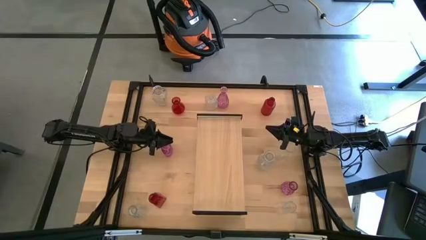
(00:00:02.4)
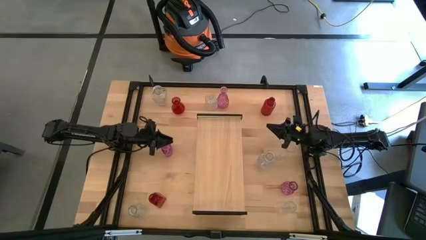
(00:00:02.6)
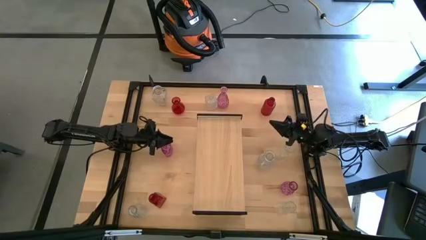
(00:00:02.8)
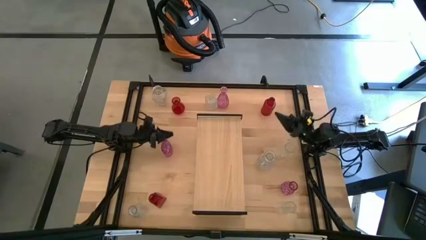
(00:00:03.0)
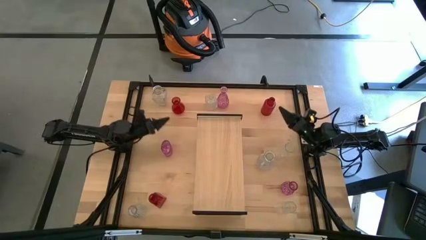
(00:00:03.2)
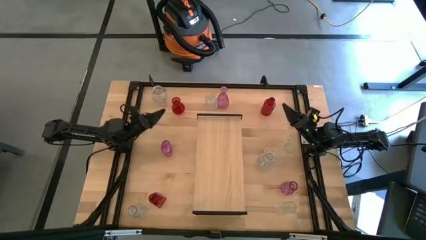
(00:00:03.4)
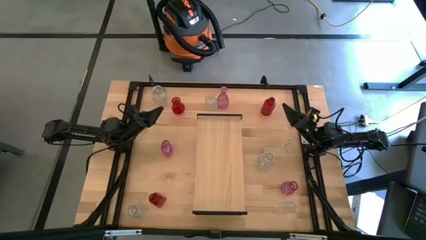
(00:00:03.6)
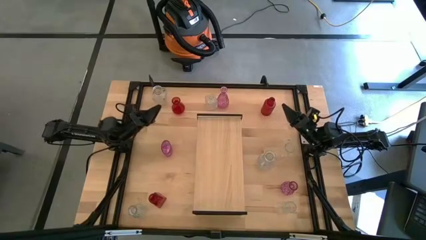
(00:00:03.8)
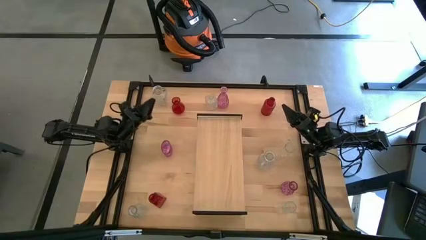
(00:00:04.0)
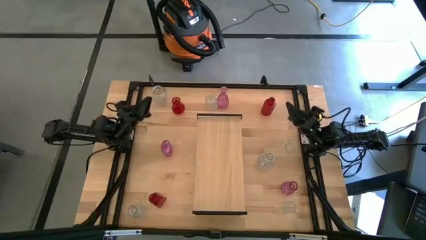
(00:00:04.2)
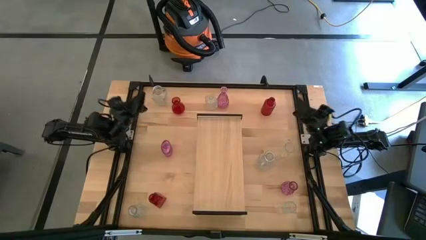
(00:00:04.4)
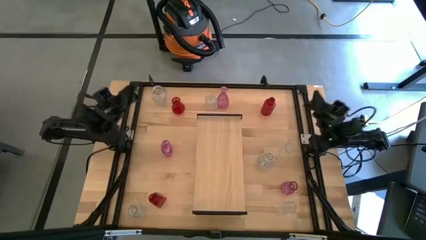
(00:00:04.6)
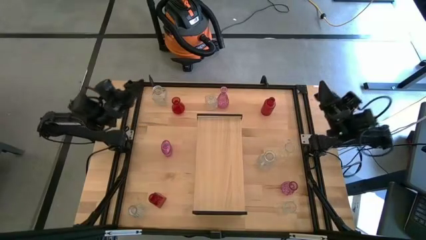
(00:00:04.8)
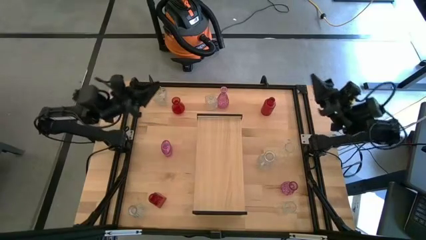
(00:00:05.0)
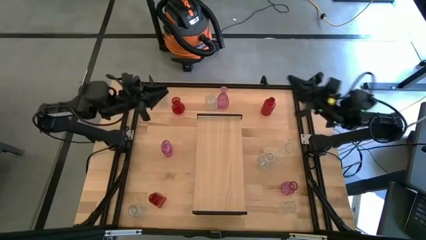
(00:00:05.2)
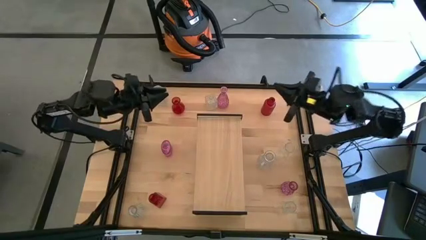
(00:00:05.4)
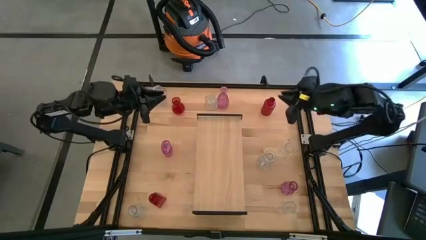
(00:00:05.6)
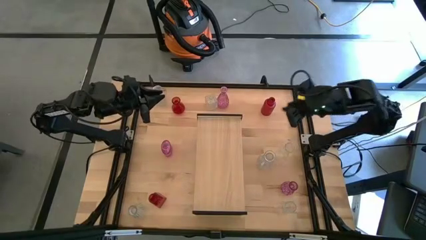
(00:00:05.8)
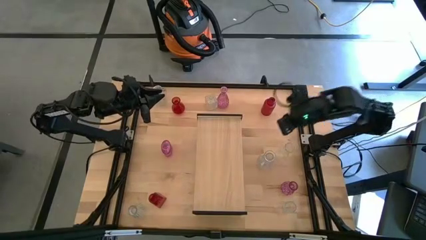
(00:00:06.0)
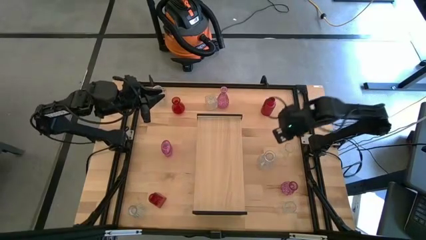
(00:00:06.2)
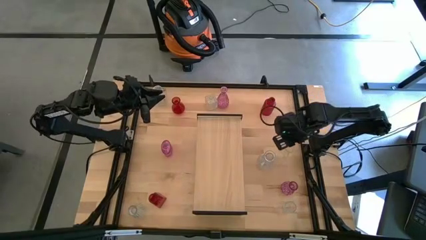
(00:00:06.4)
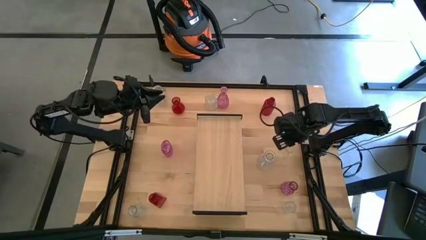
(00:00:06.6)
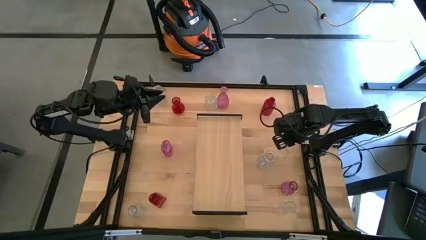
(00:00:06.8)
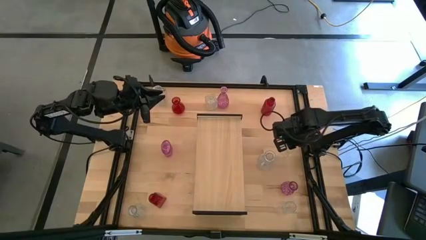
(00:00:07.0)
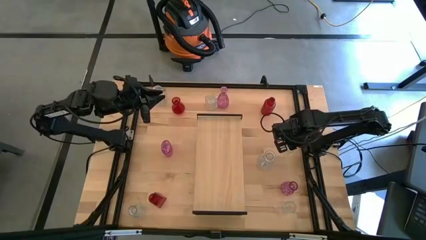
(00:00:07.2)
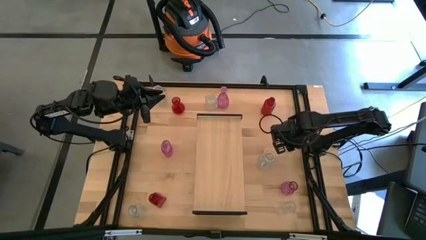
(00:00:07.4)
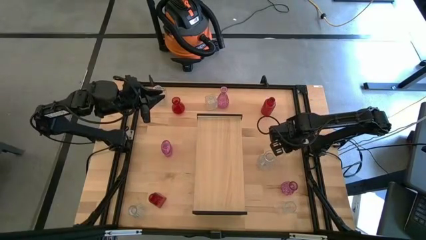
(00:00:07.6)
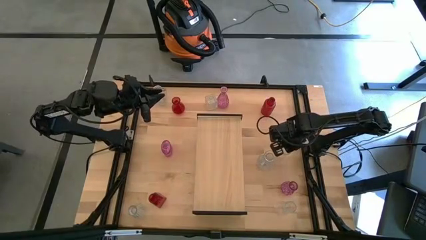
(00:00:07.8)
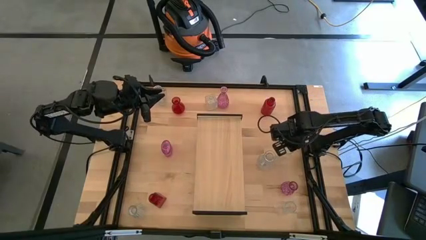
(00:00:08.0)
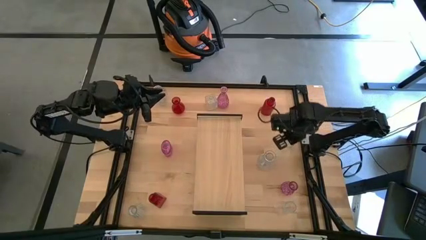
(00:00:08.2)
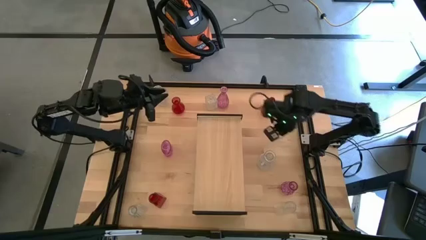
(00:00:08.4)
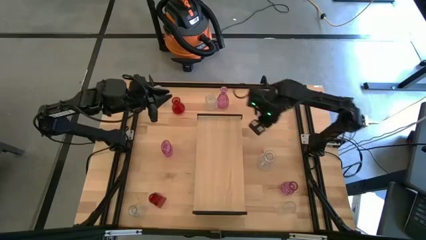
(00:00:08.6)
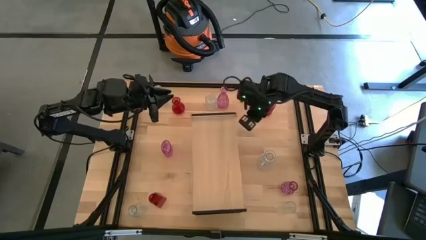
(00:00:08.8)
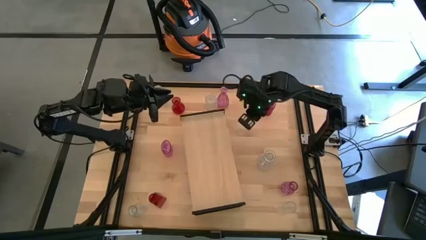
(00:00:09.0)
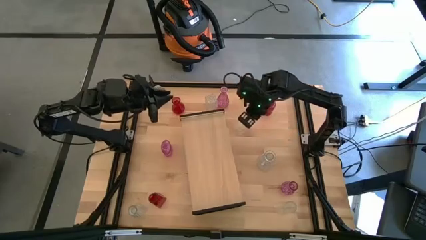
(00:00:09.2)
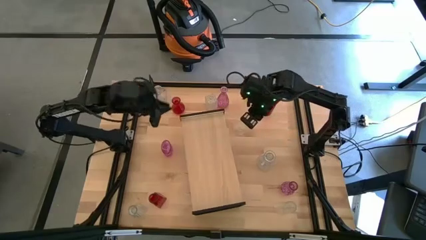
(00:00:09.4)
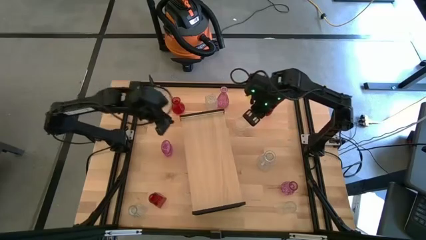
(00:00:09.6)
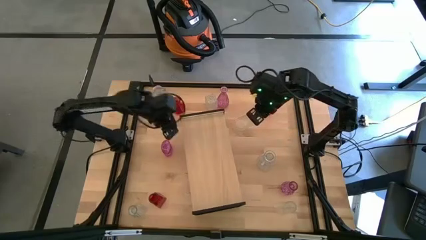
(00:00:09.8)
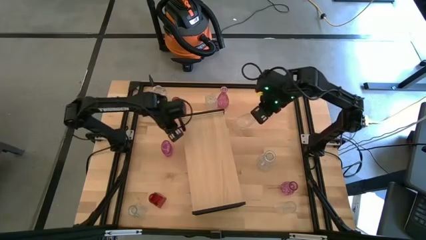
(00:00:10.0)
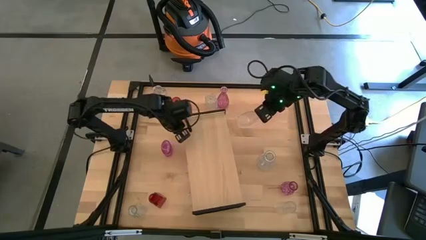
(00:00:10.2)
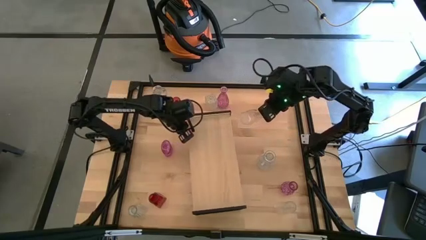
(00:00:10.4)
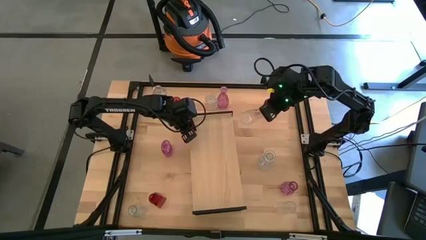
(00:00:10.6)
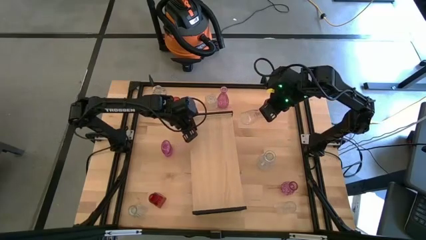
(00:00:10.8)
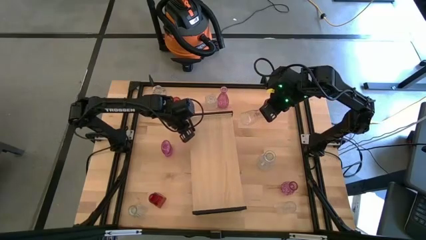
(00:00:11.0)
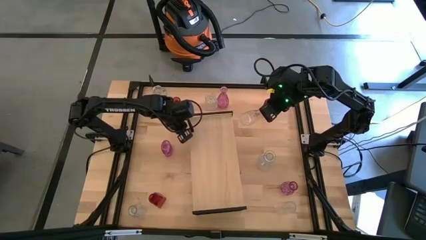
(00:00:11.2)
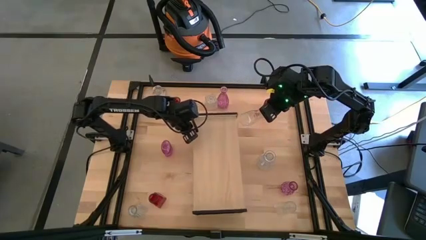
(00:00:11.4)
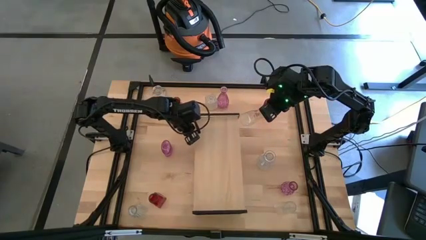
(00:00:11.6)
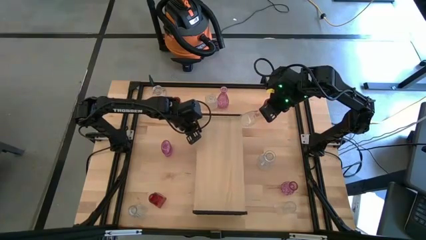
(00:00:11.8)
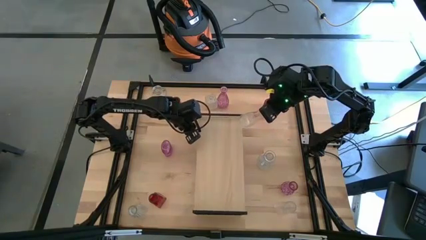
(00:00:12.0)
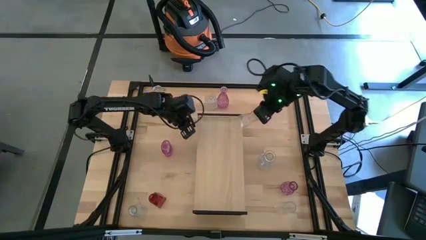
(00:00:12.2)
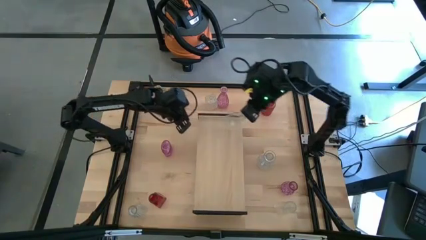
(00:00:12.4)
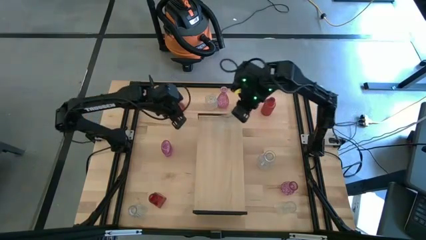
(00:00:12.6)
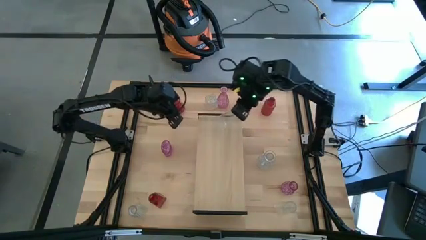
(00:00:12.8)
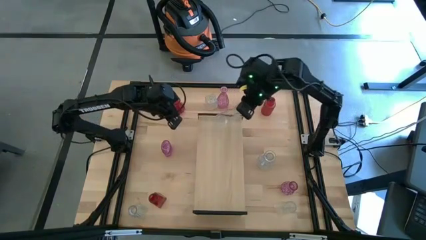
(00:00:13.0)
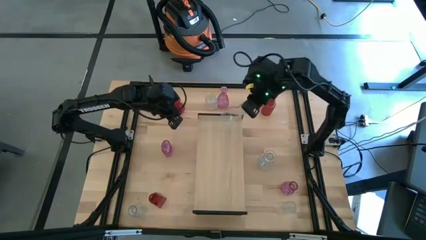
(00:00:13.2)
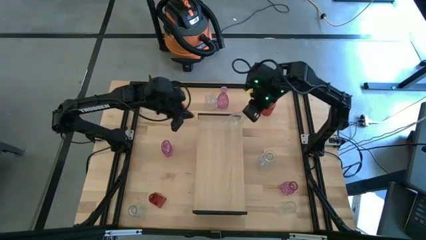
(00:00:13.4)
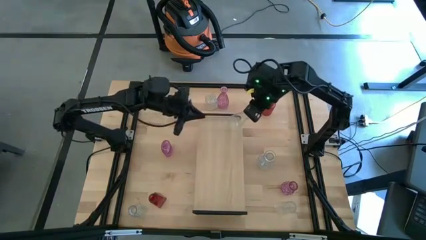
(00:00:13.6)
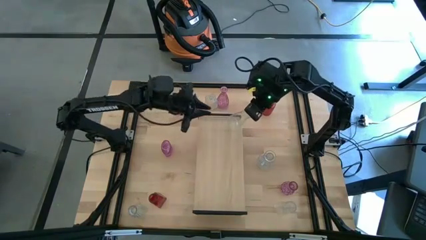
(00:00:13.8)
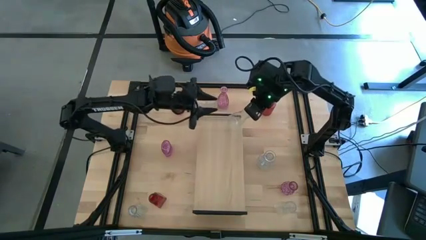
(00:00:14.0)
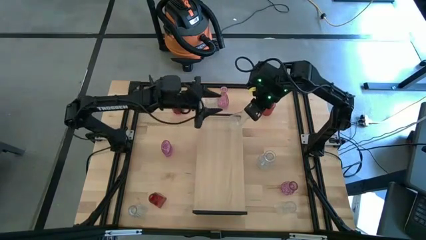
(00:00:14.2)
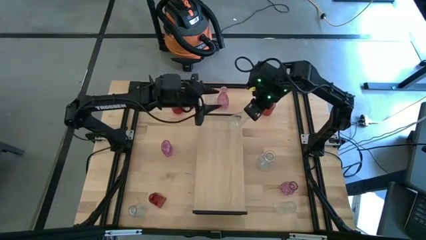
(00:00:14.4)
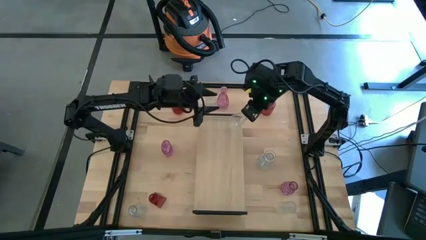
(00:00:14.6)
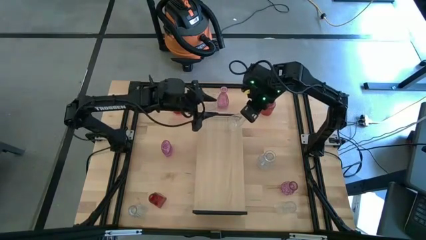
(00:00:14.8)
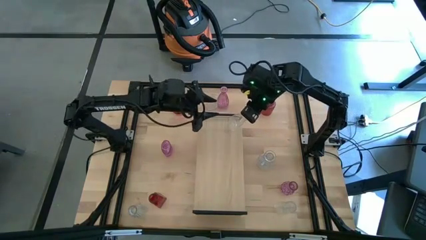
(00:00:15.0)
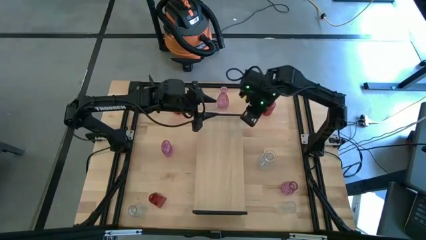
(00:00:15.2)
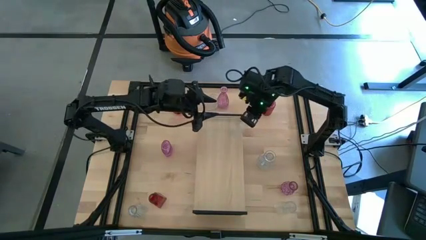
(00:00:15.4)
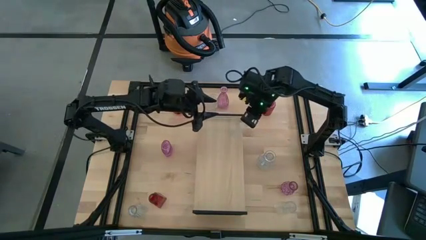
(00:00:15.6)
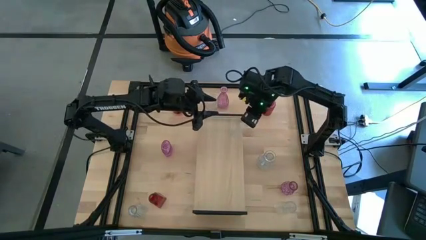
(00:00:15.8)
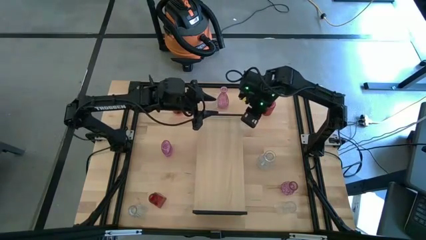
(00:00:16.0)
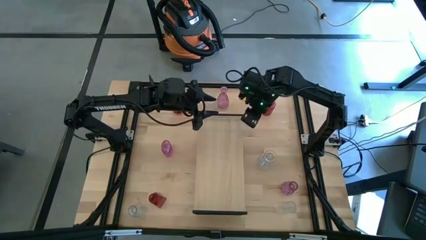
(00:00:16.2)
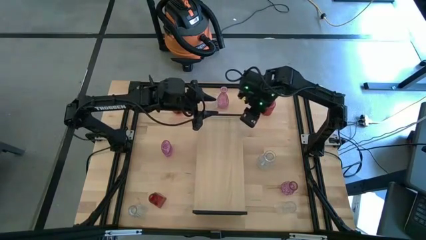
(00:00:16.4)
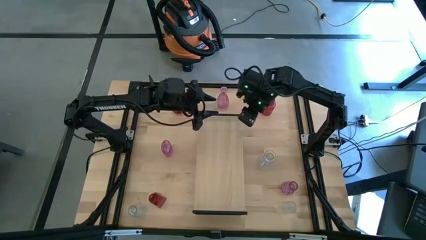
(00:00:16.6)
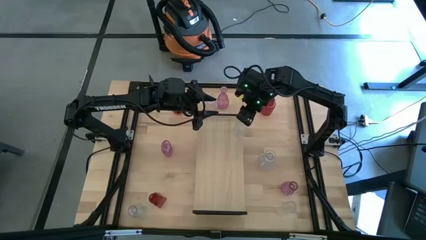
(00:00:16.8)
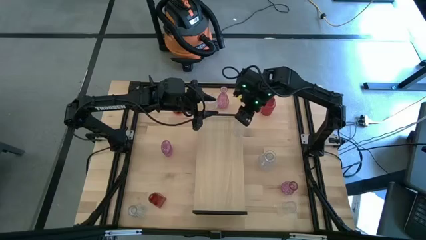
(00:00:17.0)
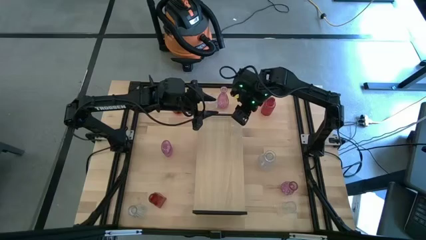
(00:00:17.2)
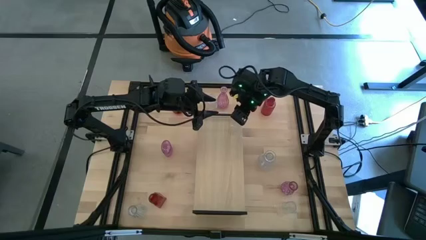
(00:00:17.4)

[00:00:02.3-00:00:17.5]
Task: sort vases onto shelf
Put the transparent vase on the shelf
